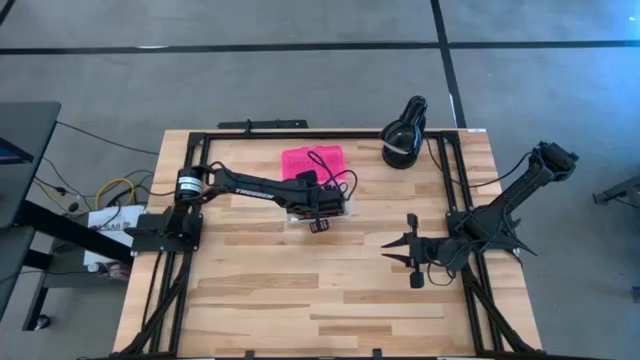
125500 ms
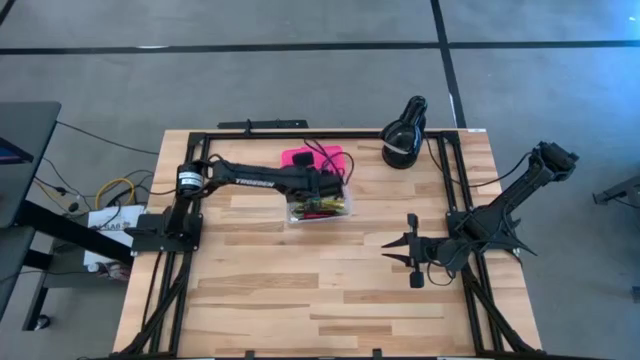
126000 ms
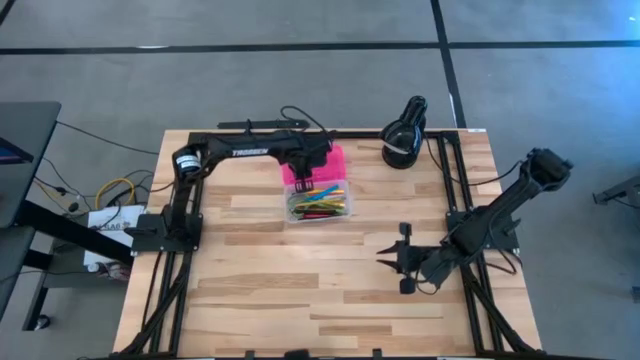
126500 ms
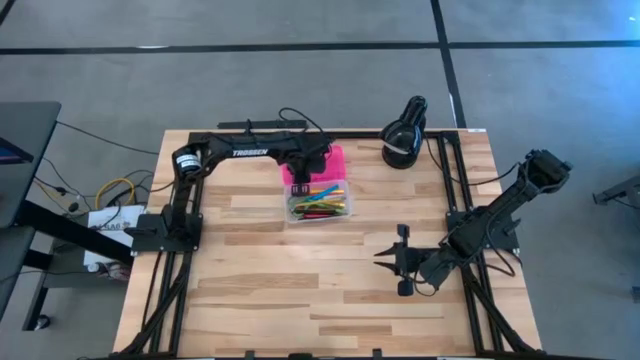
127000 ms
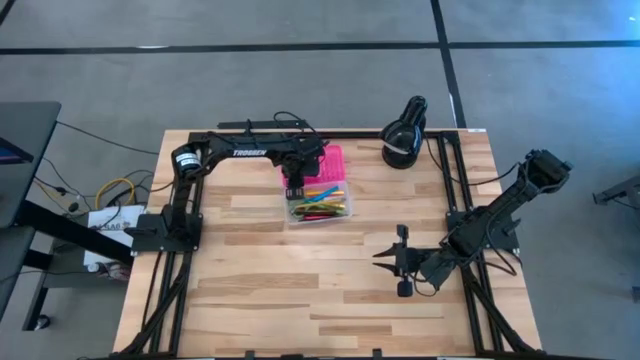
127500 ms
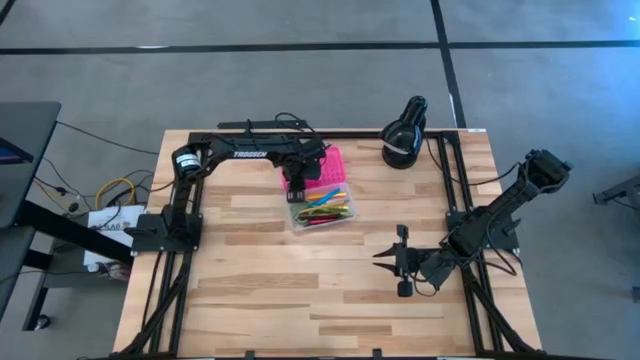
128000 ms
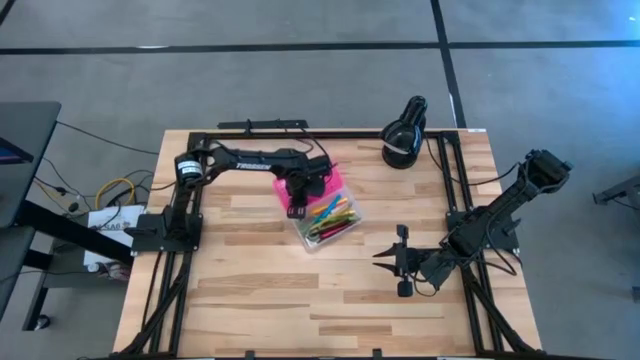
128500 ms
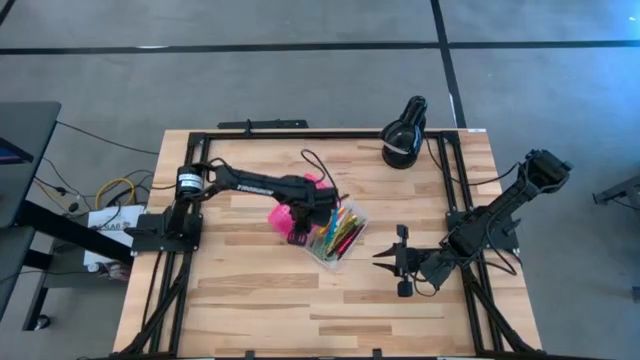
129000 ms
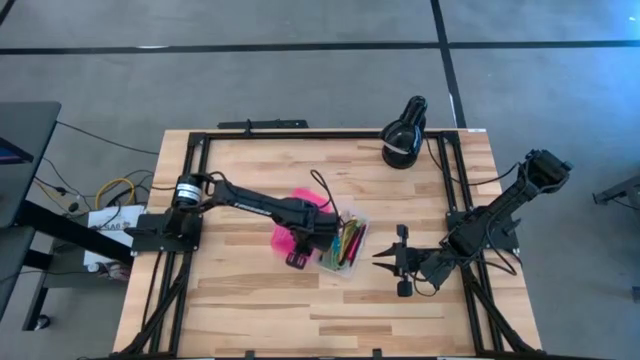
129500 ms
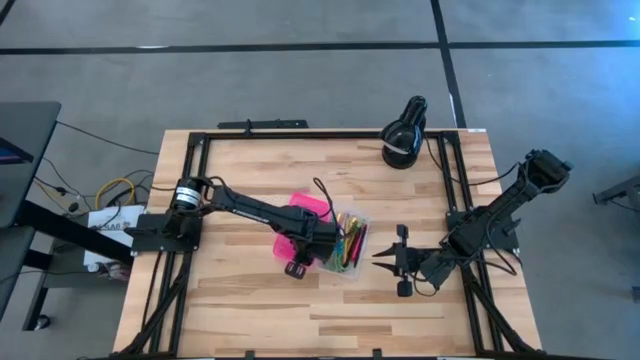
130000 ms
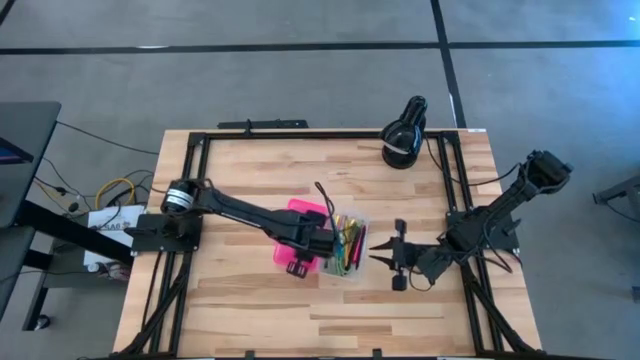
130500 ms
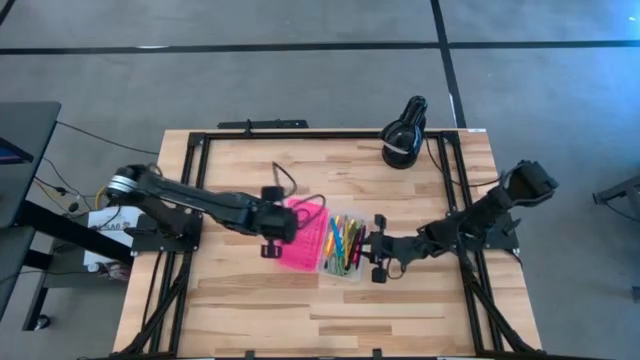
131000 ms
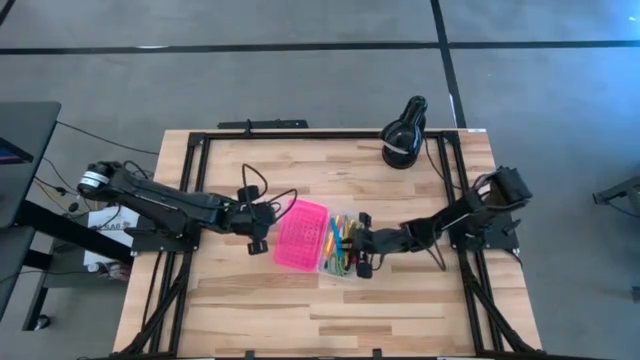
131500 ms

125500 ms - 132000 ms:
Task: Pick & place school supplies into a supply box
Move the supply box to the center of the table

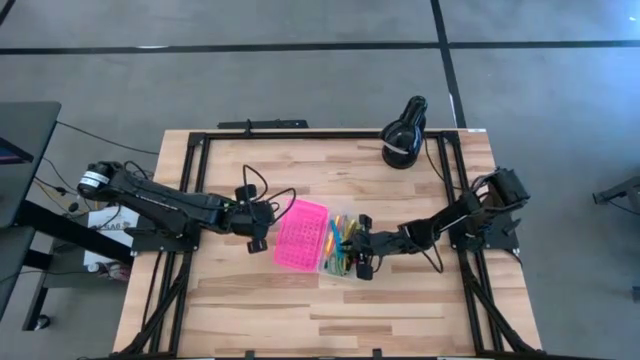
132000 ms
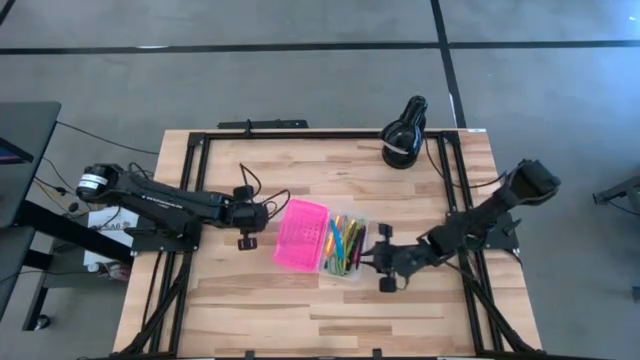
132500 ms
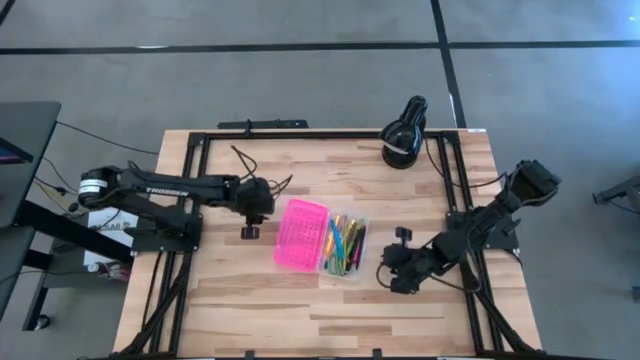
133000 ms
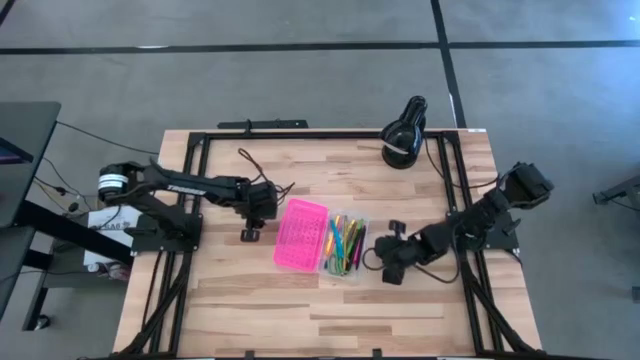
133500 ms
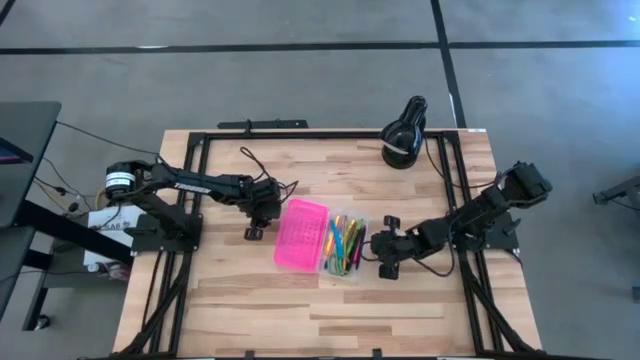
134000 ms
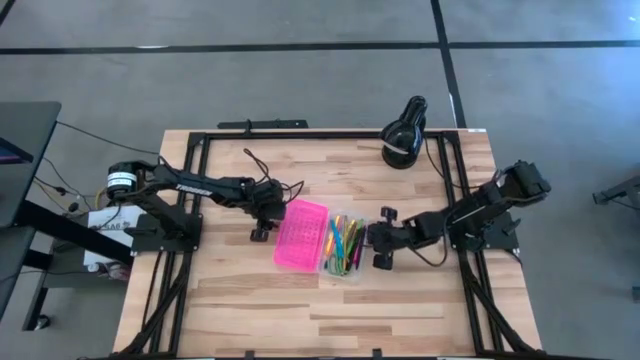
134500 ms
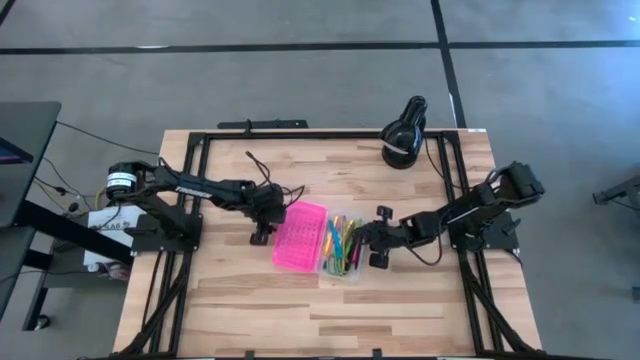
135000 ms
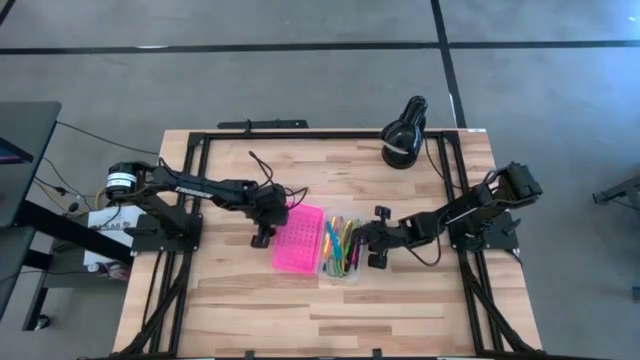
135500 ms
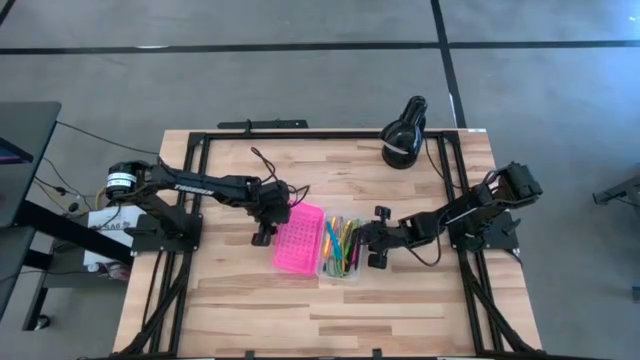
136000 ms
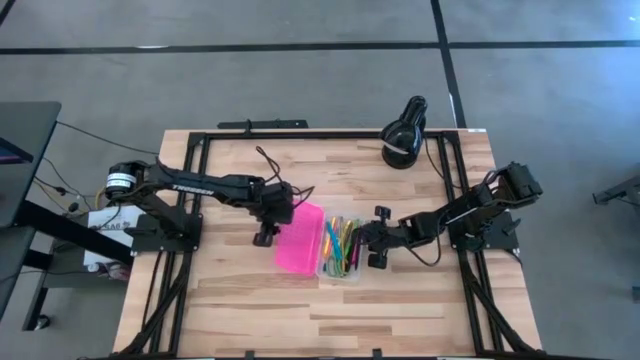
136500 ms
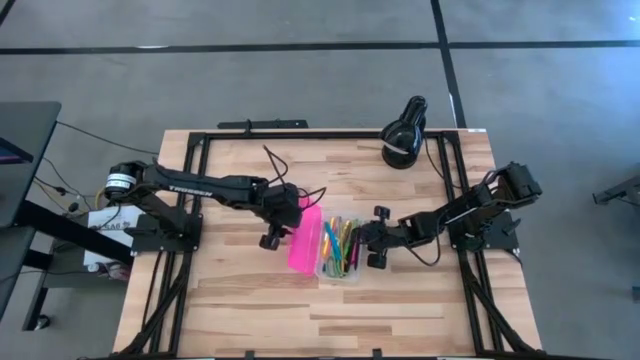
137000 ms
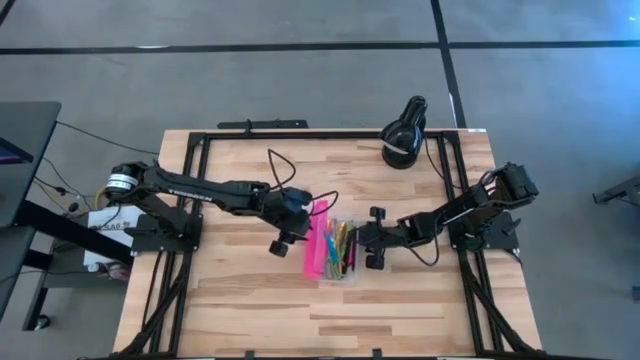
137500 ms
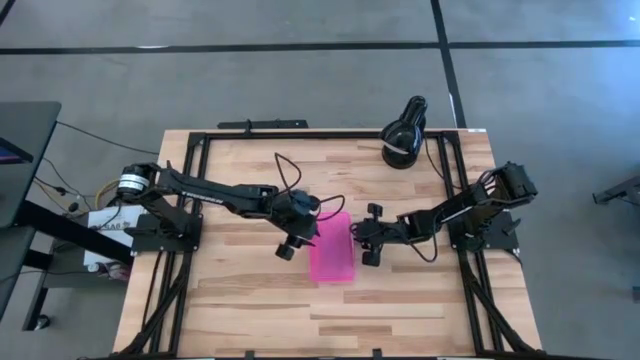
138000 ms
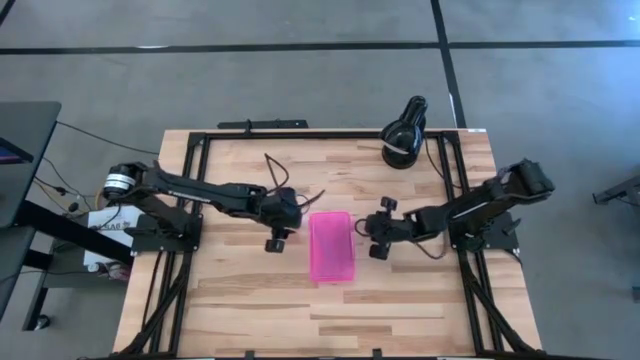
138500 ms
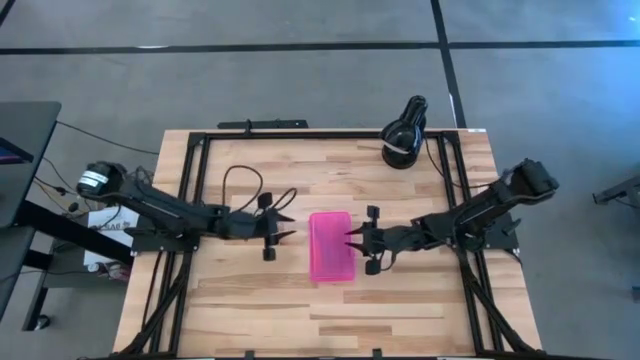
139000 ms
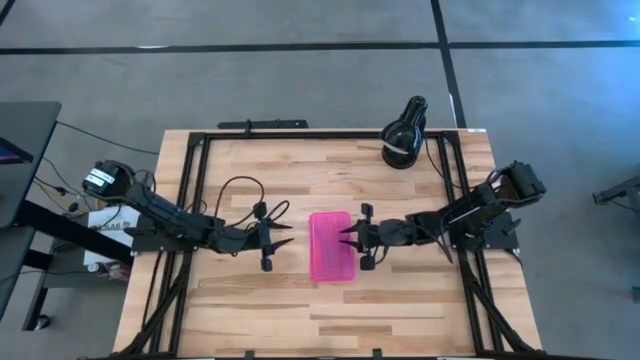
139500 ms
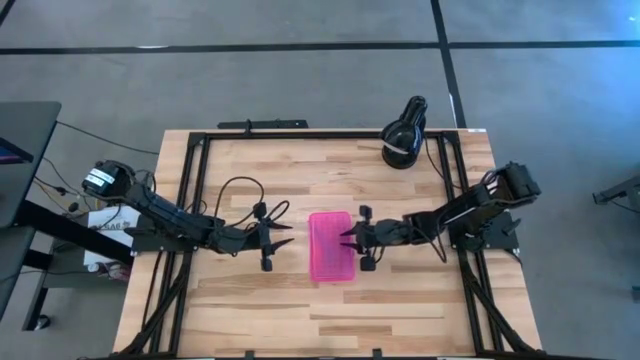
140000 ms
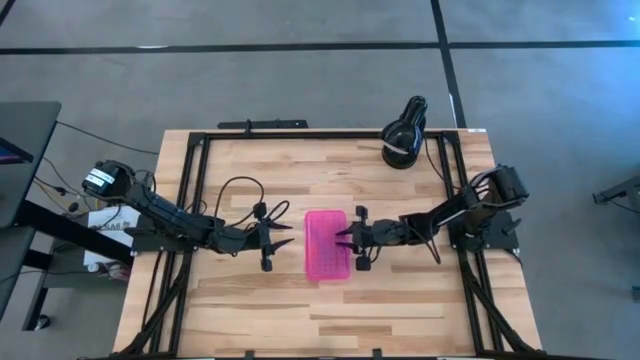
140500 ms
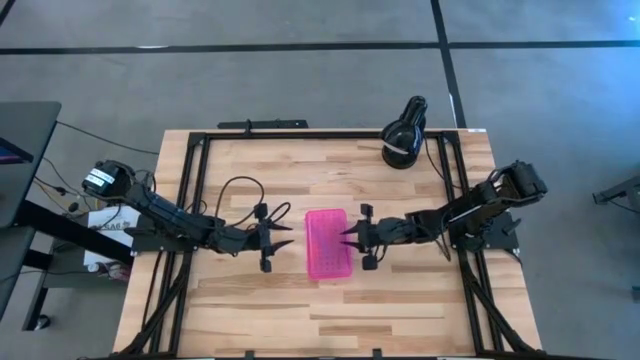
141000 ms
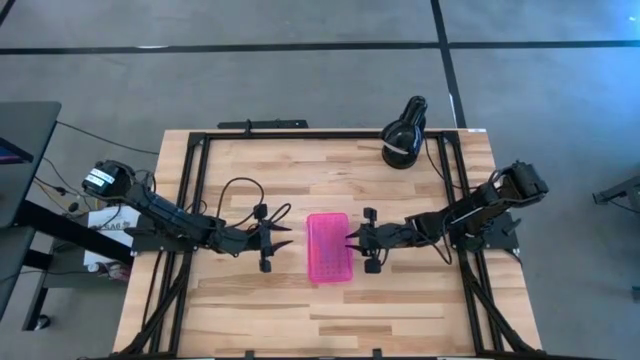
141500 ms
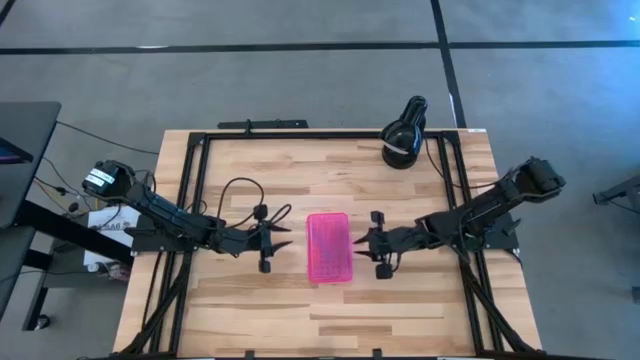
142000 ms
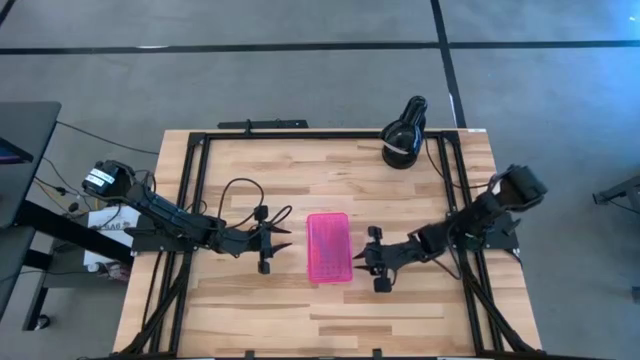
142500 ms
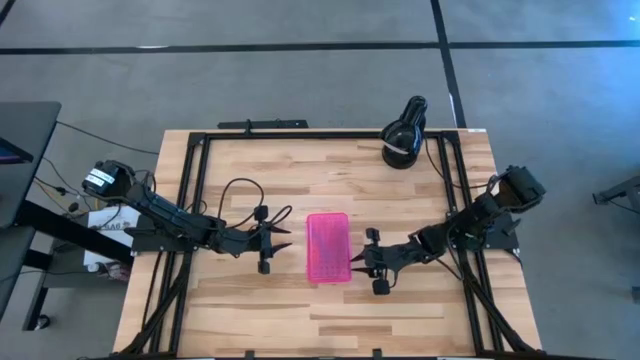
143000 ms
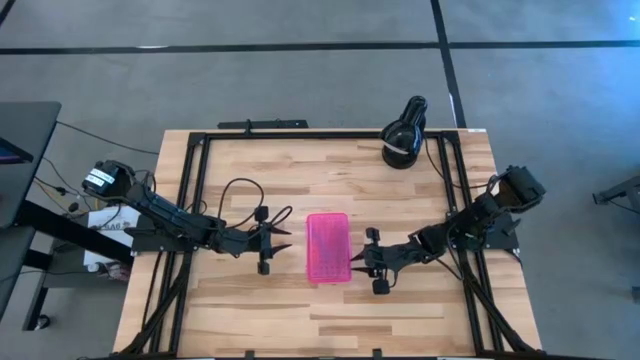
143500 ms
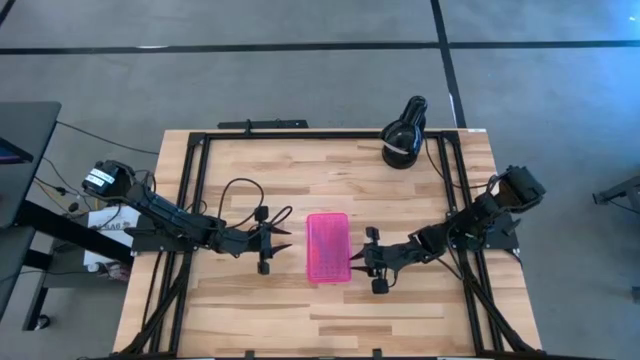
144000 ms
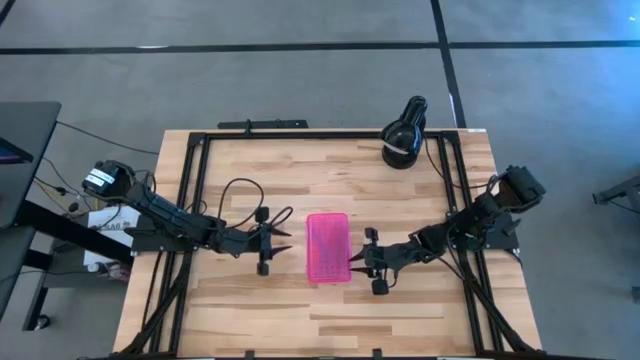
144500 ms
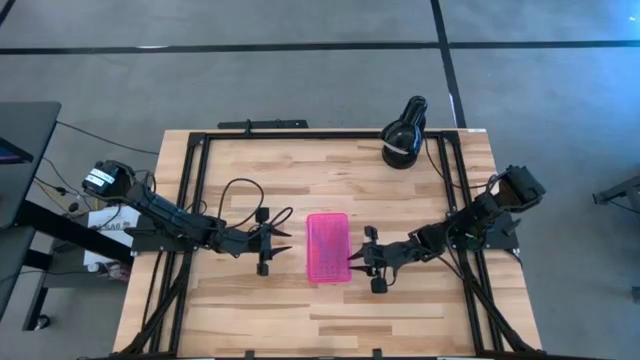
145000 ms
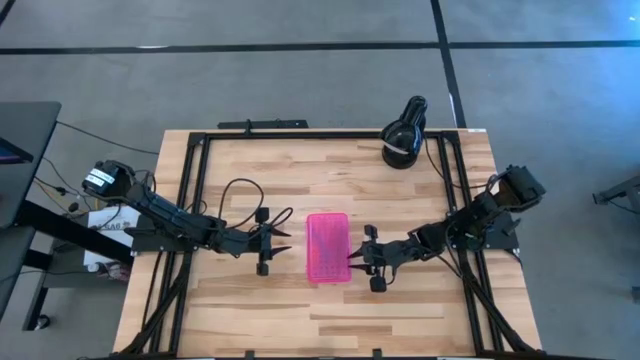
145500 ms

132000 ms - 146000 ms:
Close the supply box

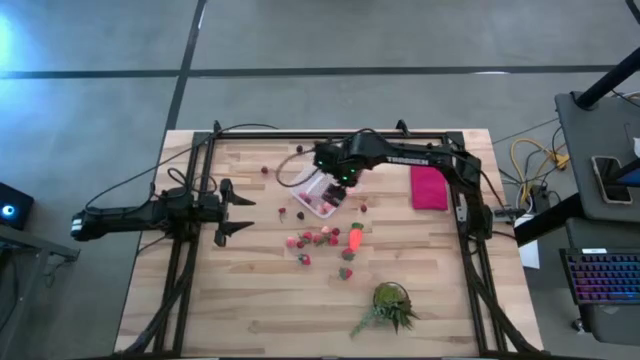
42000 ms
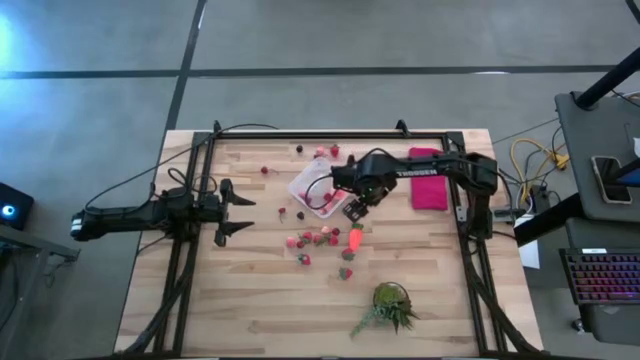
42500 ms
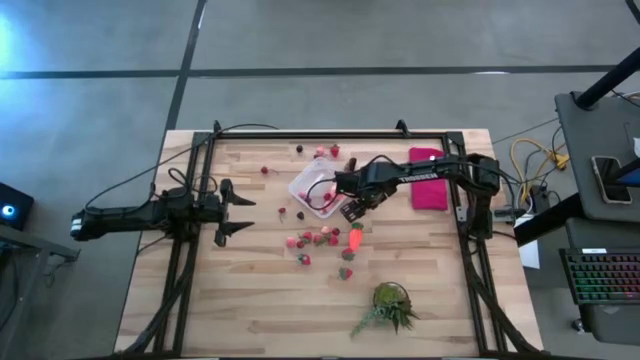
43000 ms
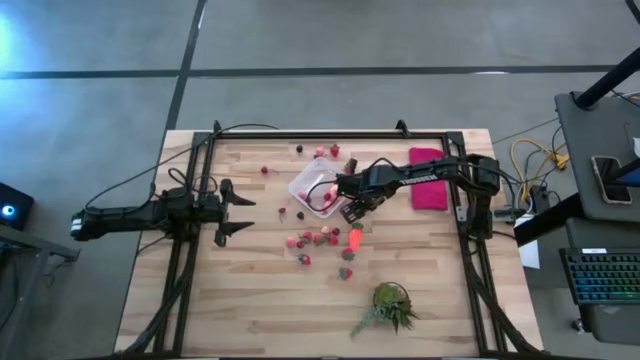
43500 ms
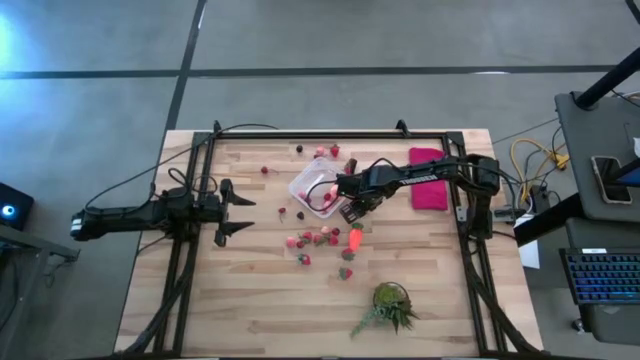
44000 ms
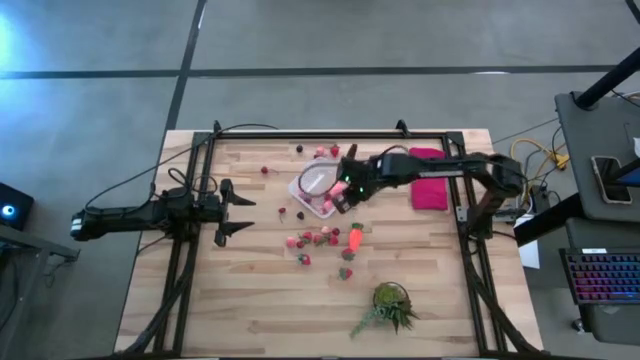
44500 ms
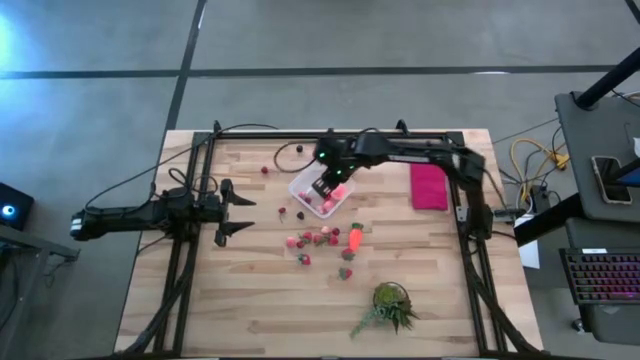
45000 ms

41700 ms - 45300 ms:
Task: Pick and placing Produce into tupperware
Put the red cherry into the transparent container
